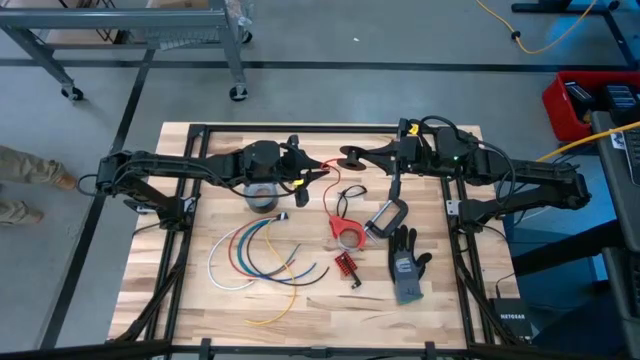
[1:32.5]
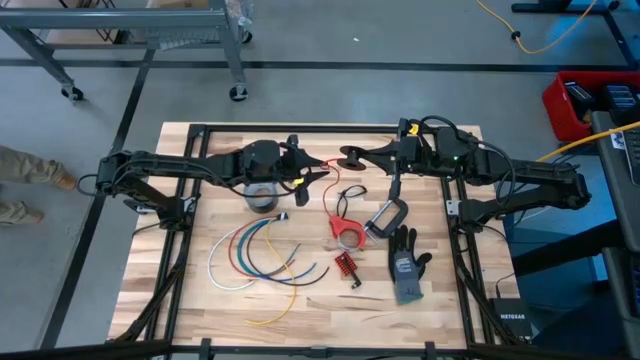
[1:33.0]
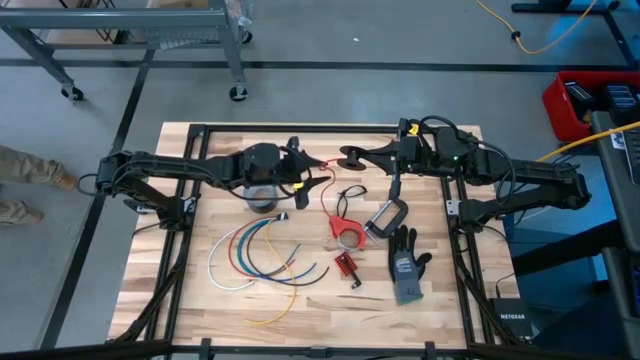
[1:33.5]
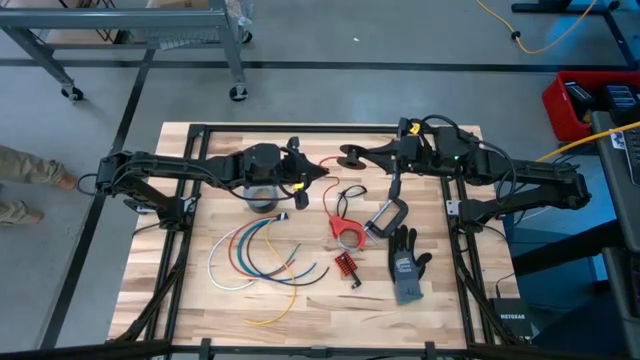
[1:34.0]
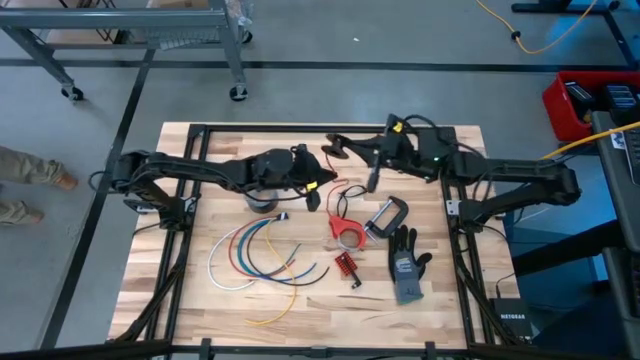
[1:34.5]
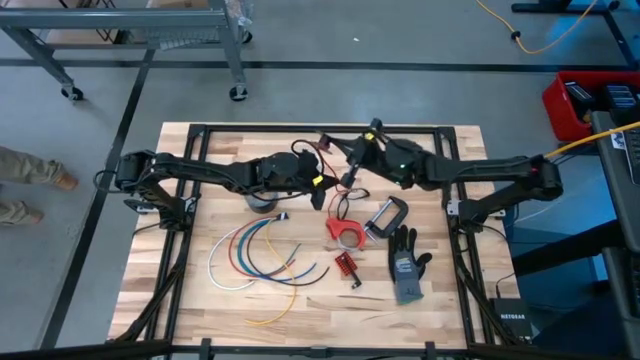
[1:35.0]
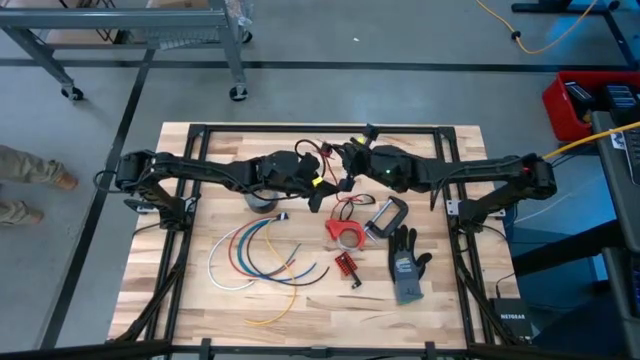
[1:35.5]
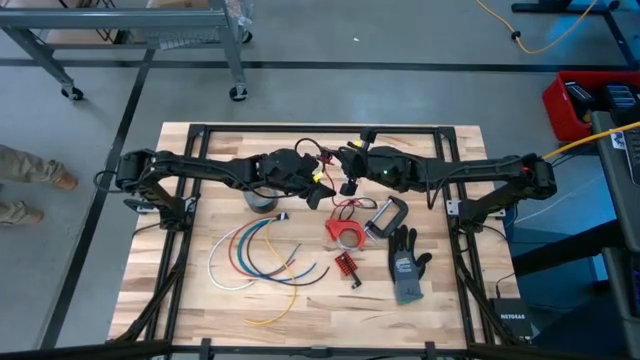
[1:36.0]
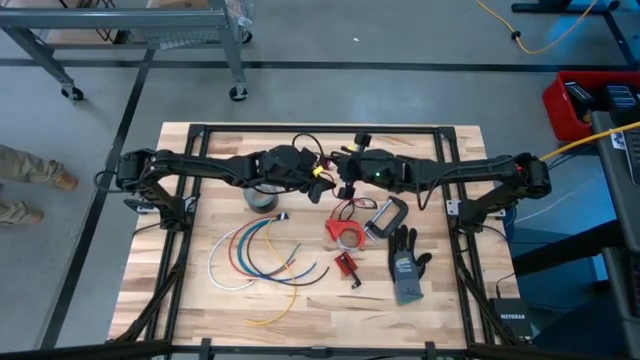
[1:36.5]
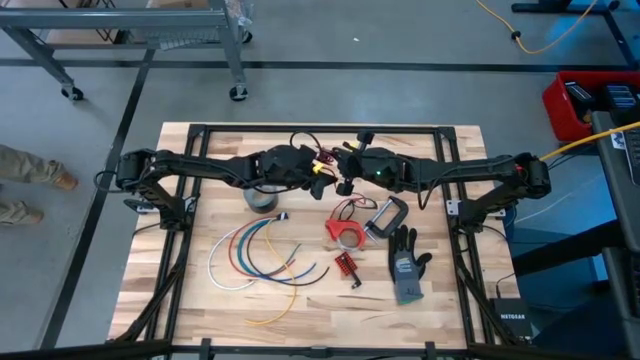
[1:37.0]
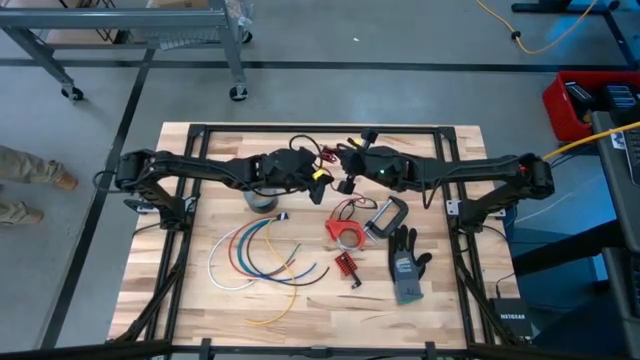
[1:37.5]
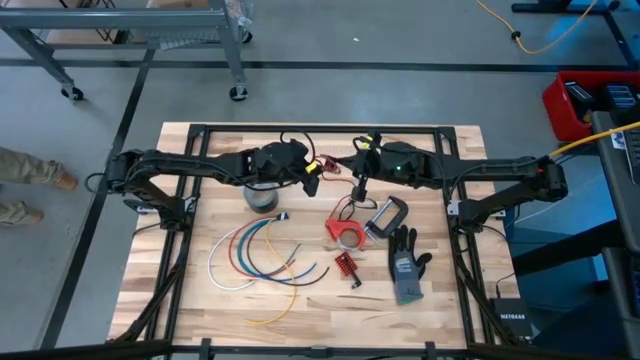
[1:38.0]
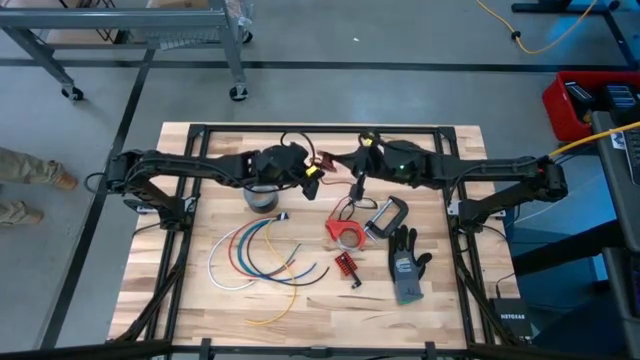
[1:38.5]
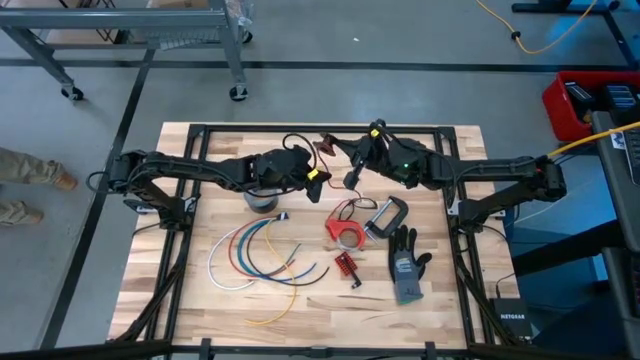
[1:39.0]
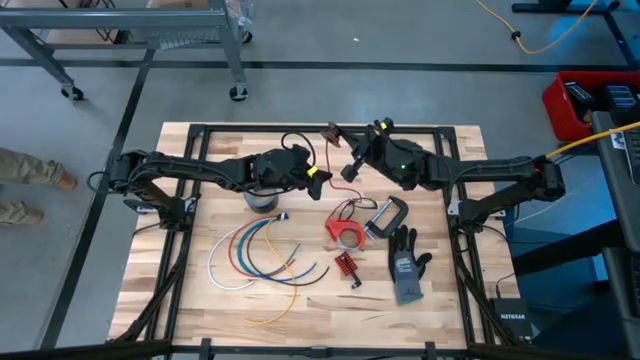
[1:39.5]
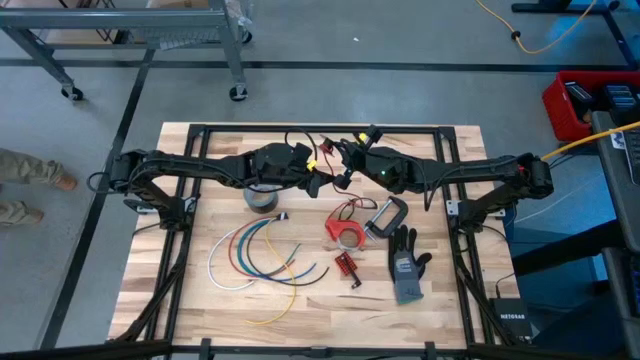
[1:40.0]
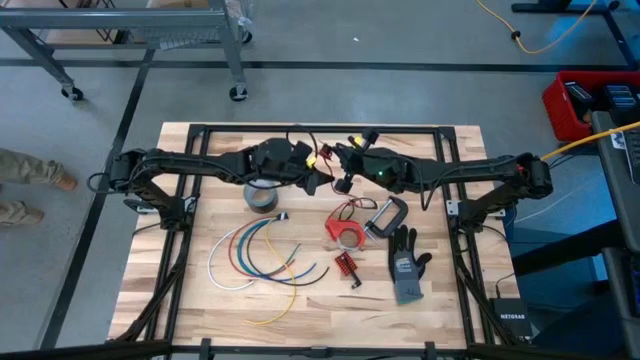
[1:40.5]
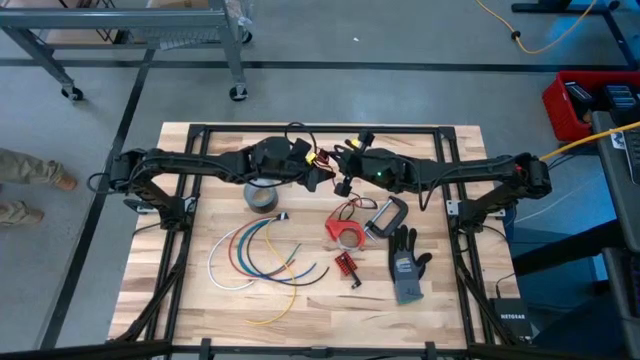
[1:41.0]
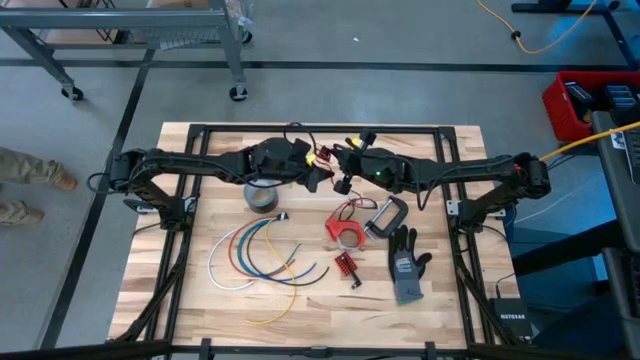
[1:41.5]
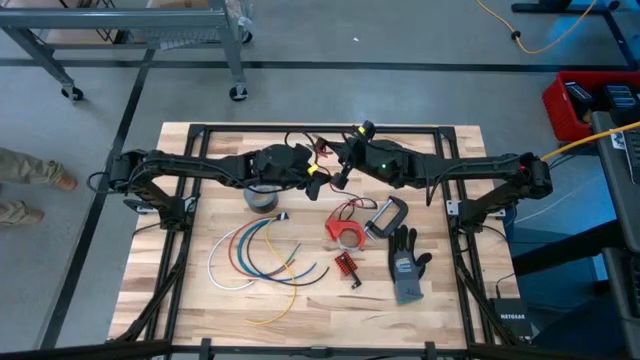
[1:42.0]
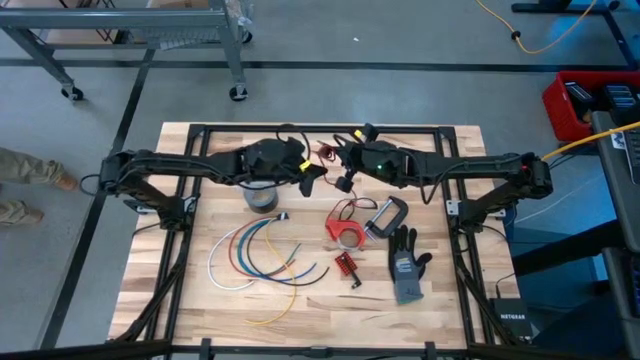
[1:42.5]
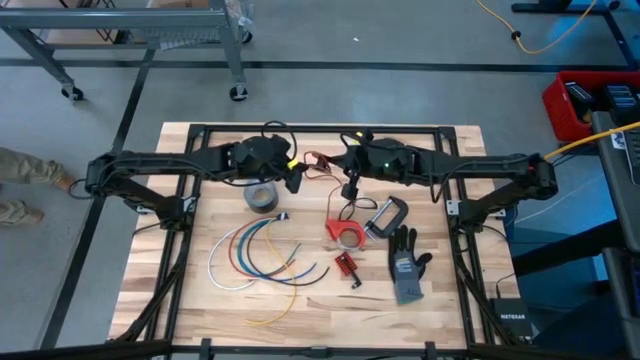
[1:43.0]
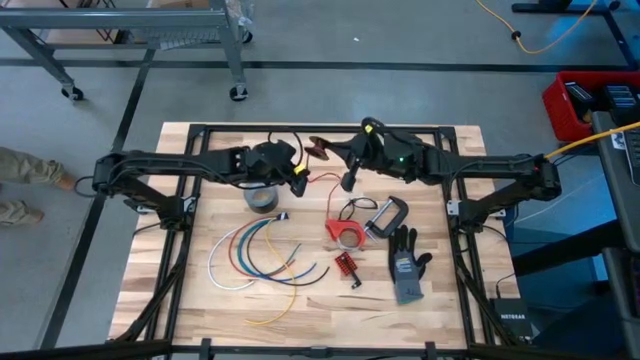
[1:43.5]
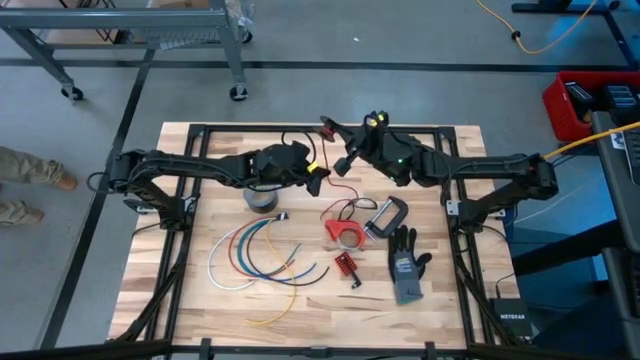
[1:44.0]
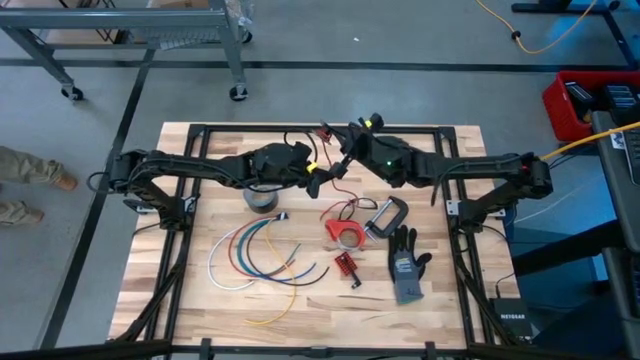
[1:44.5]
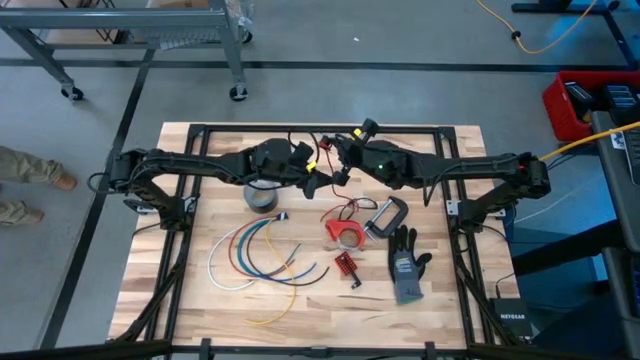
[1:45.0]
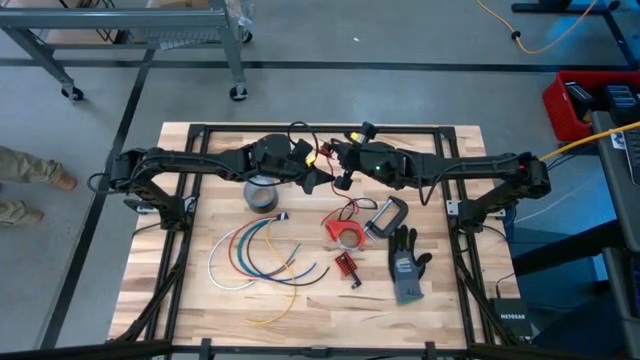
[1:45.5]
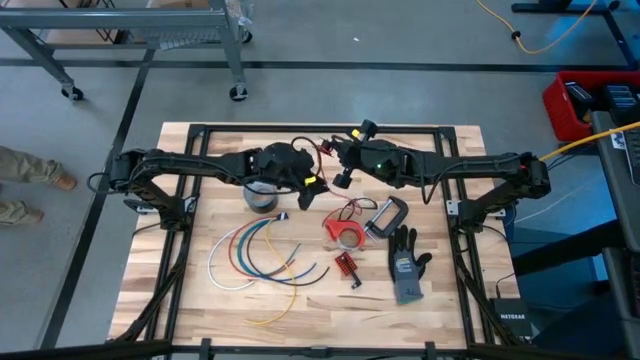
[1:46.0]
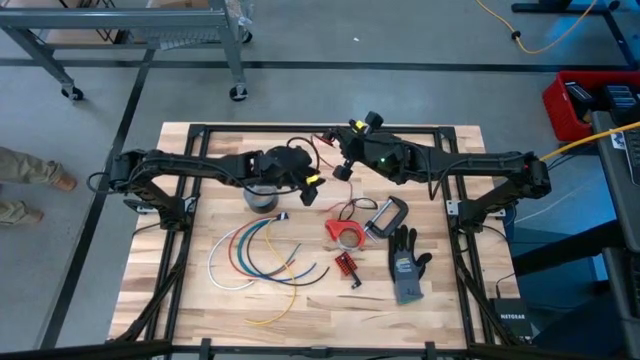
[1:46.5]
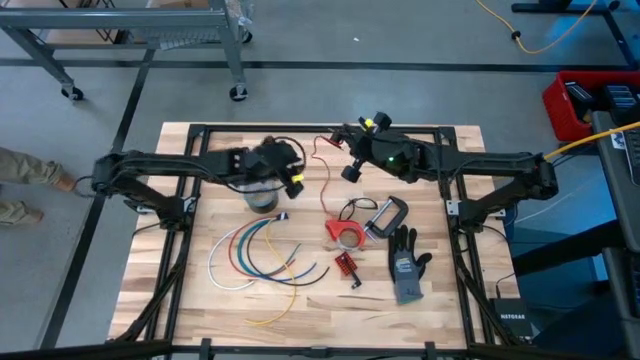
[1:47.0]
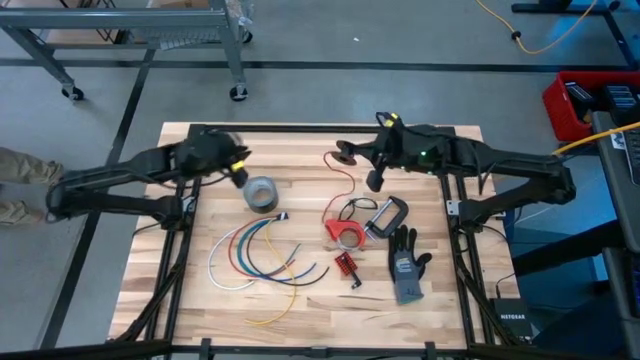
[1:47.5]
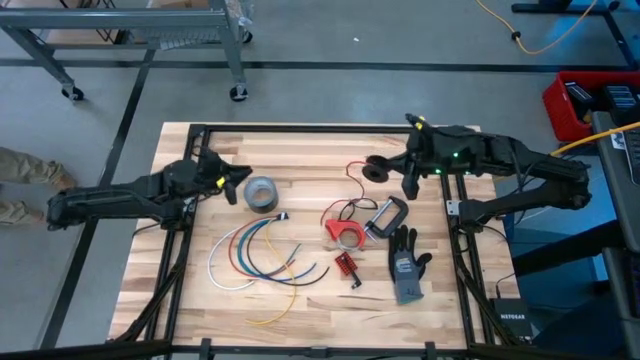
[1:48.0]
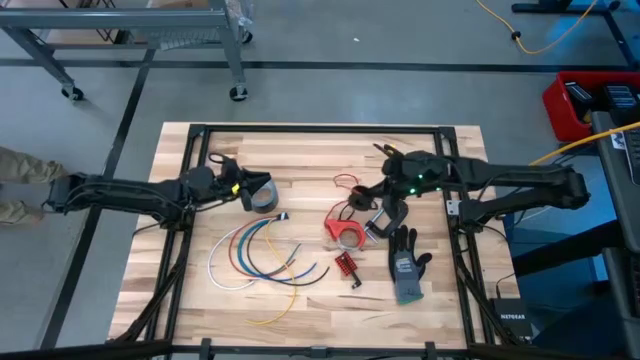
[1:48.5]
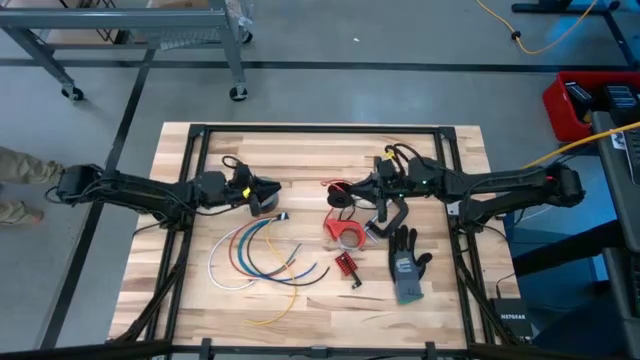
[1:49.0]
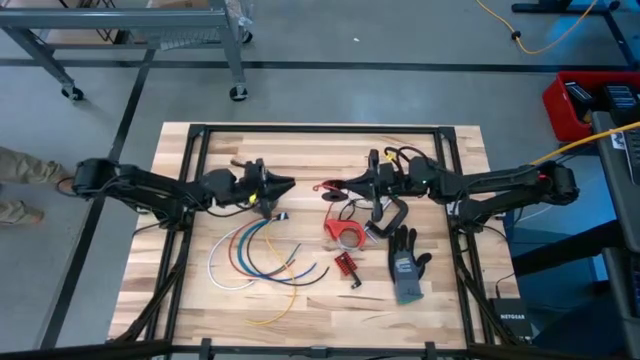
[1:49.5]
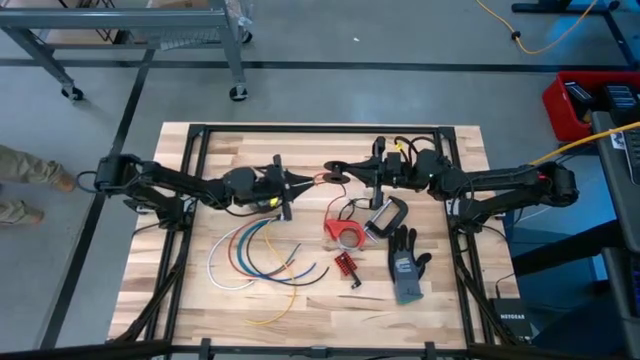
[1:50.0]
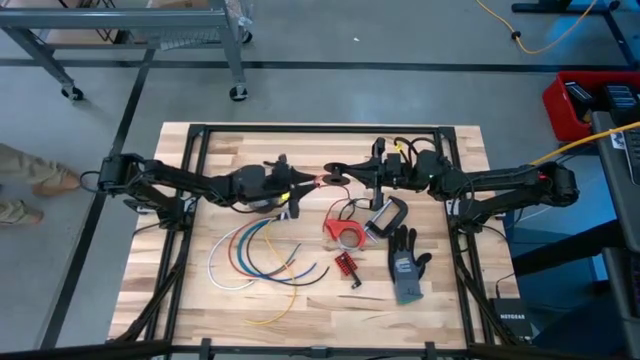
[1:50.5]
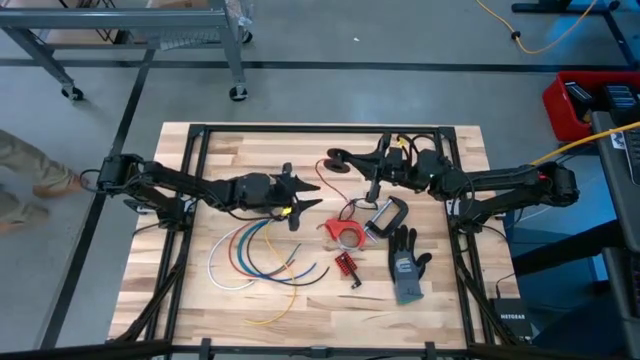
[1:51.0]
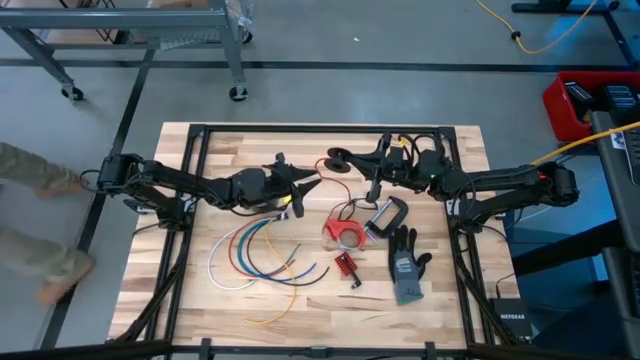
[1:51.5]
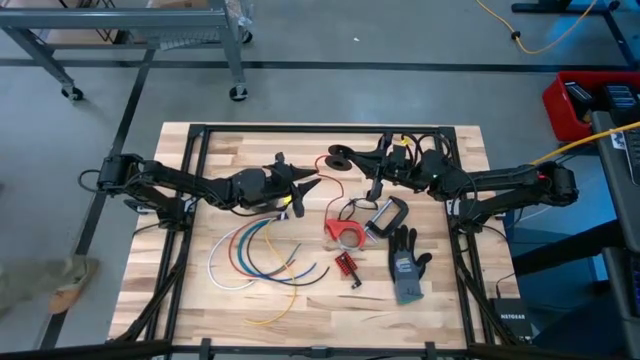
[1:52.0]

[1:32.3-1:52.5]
Task: Coil cords
Coil the red wire onto the spool
